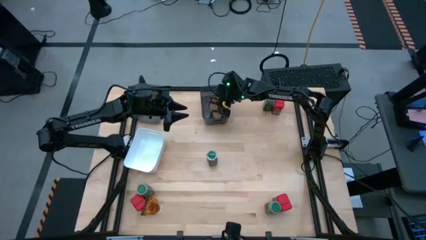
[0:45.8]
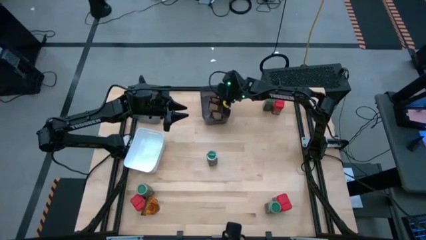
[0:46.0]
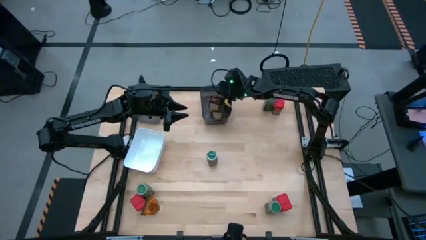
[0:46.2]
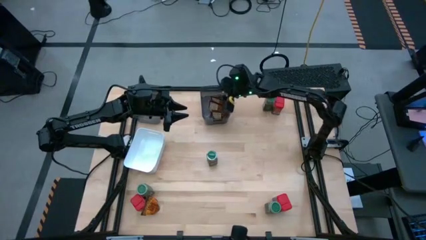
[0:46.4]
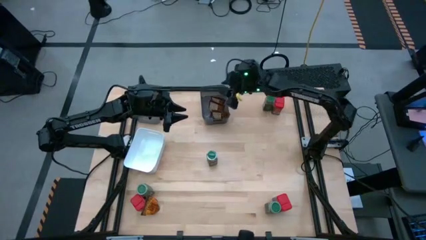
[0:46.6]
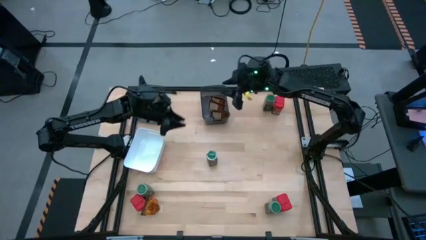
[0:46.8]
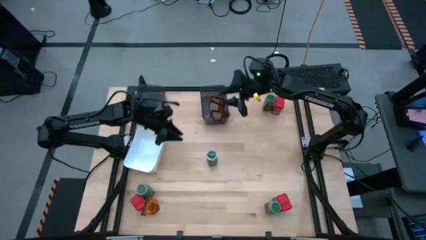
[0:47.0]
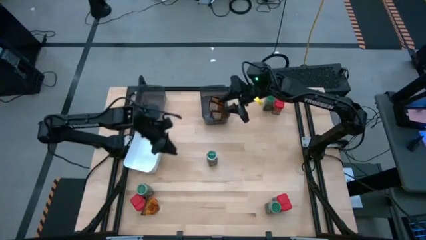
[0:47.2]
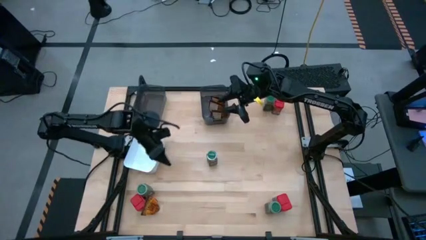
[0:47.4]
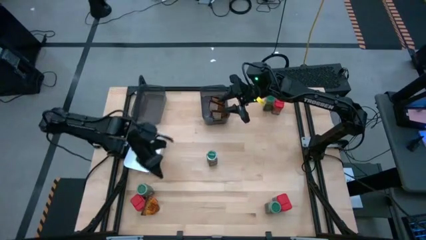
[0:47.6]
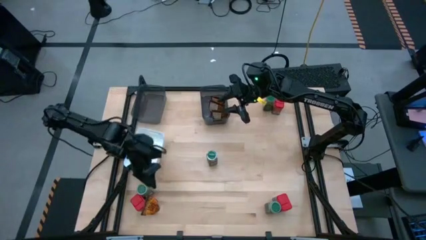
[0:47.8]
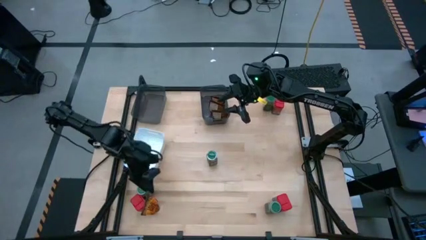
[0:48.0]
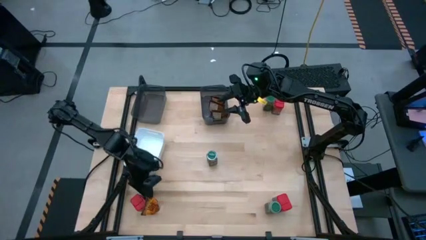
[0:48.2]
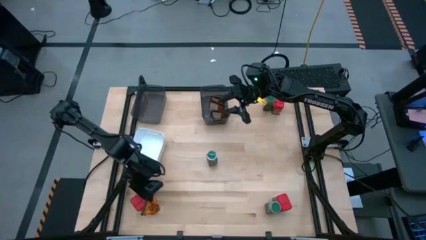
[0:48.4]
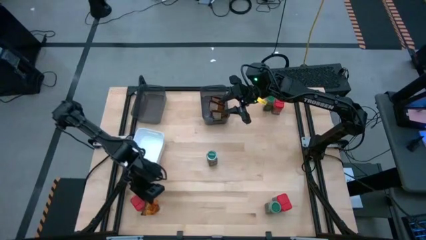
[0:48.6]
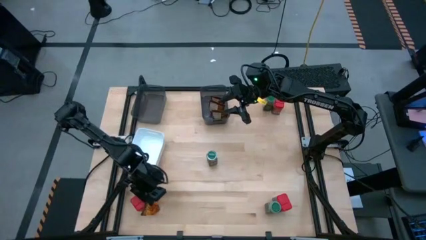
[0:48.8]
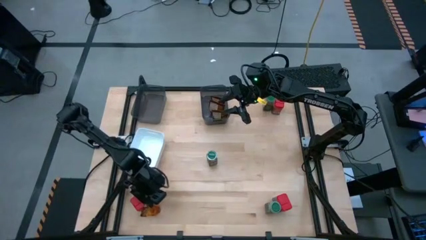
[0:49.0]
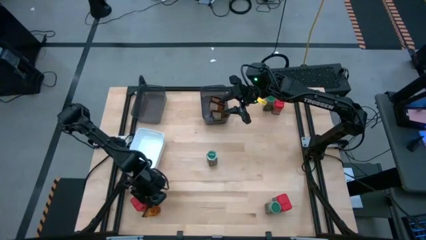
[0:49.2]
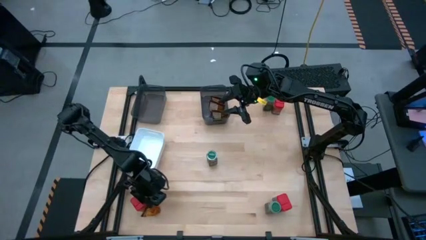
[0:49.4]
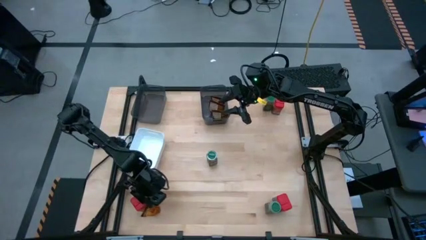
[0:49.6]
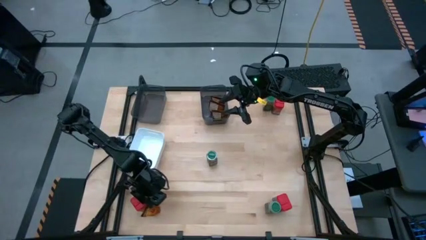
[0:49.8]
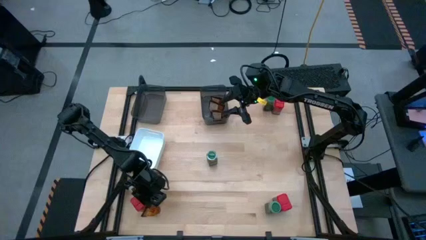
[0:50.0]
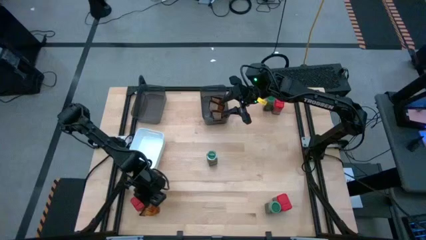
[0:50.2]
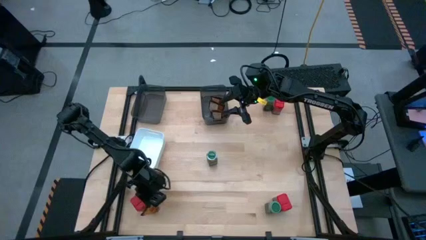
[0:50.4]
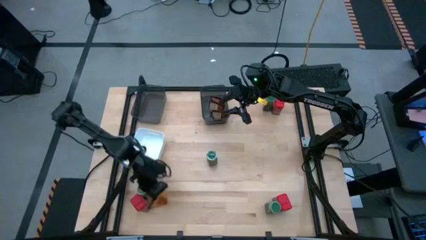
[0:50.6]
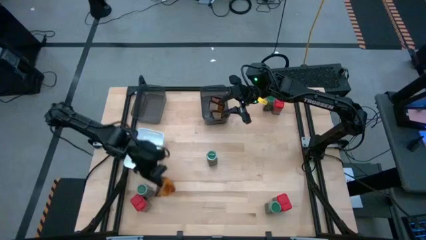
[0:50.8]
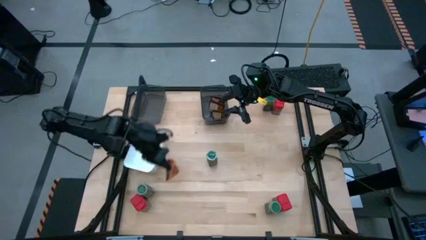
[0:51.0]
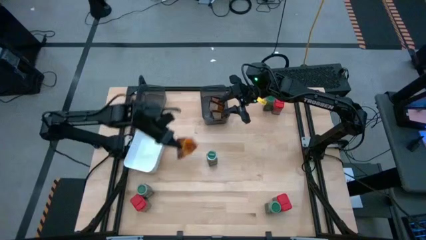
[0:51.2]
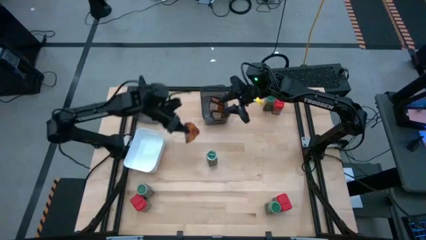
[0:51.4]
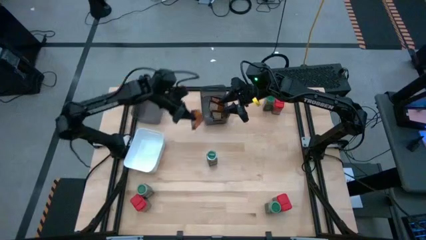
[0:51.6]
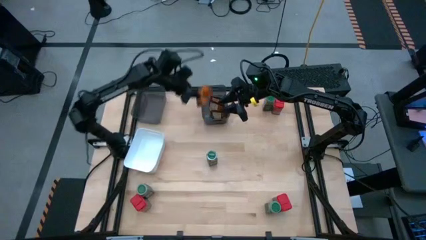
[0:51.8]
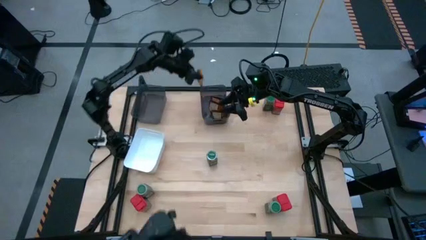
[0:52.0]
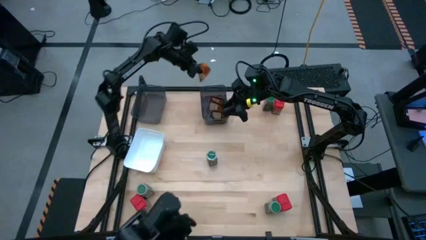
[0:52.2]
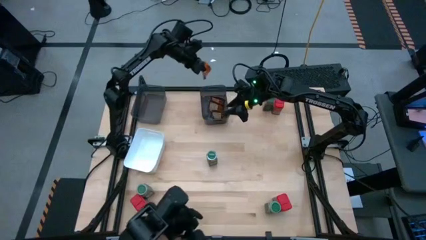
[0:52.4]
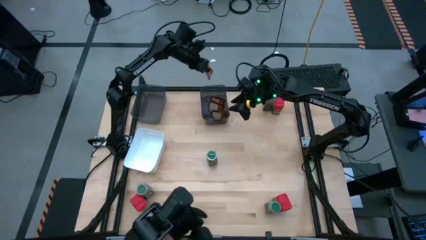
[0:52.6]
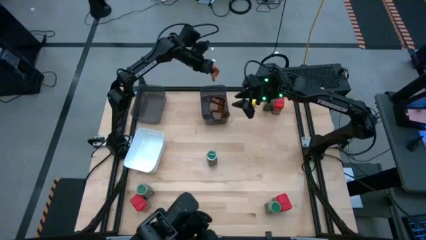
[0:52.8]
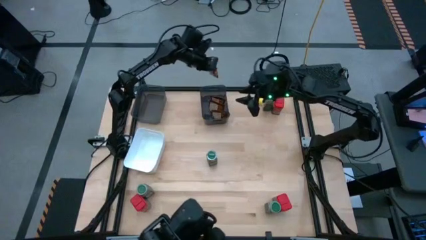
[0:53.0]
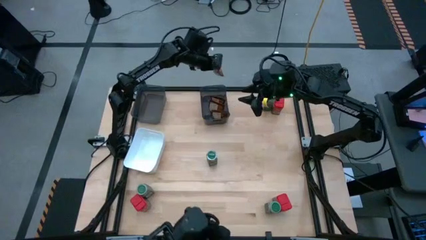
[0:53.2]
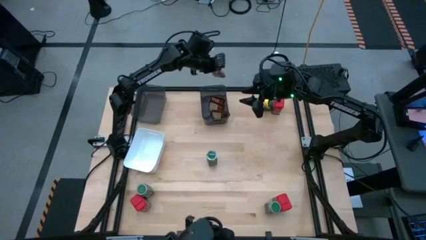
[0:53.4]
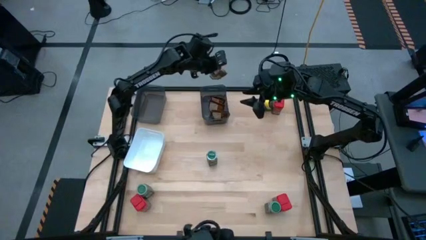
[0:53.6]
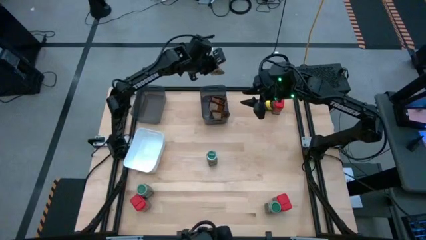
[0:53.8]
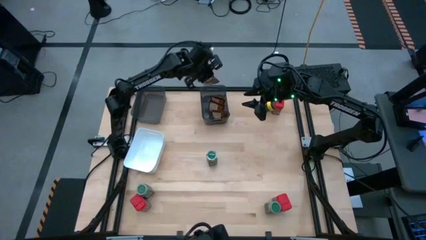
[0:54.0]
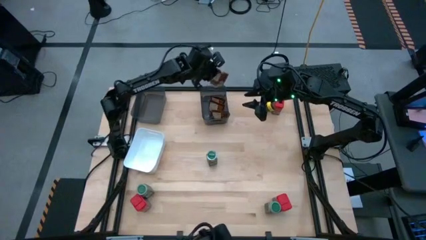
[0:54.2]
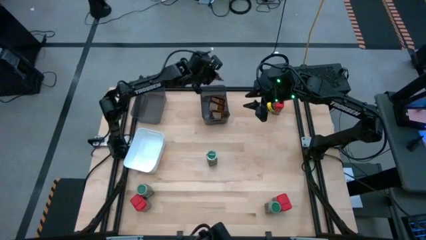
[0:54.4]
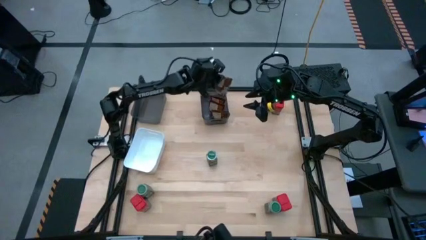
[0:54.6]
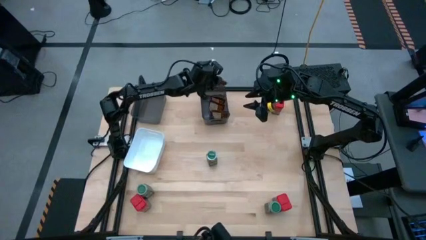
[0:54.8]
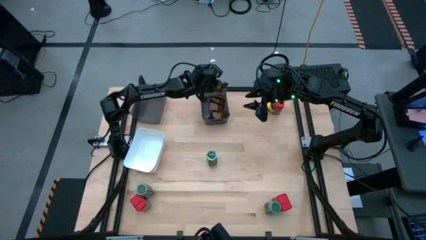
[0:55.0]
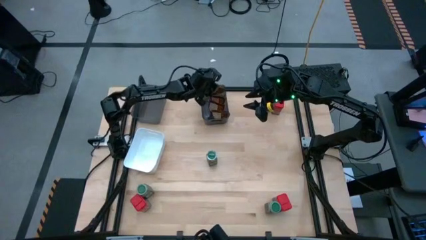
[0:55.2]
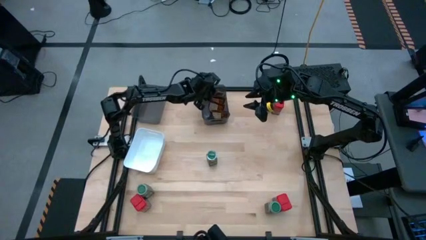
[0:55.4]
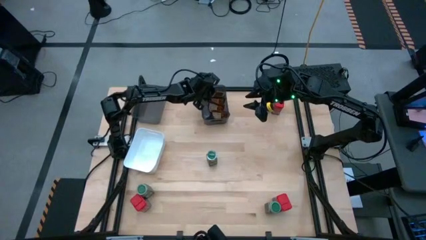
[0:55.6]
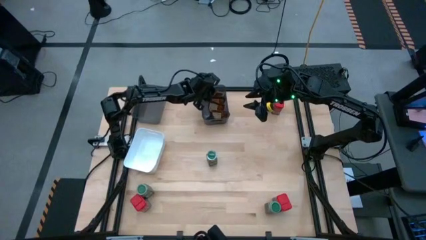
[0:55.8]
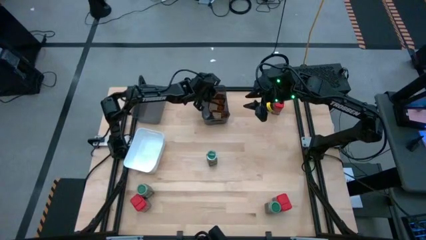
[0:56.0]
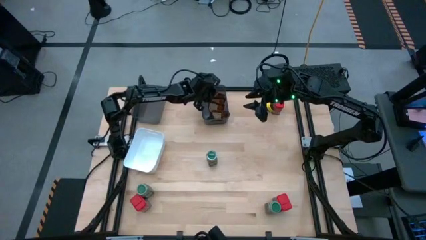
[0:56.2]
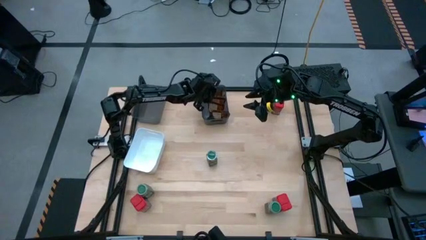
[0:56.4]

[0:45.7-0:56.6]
Task: Sort spices by type
Put the brown seasoning bag into the middle black bin

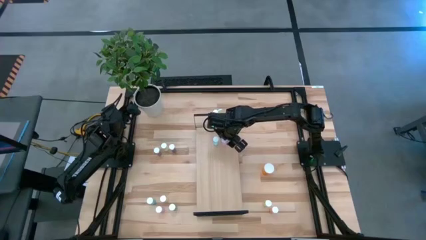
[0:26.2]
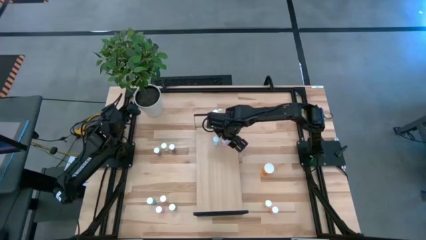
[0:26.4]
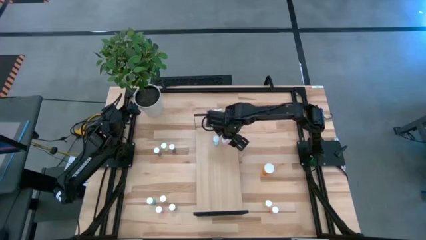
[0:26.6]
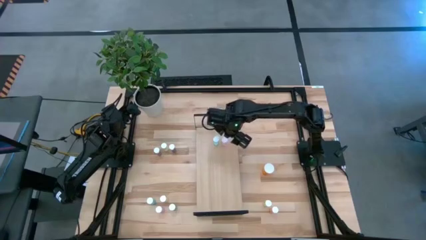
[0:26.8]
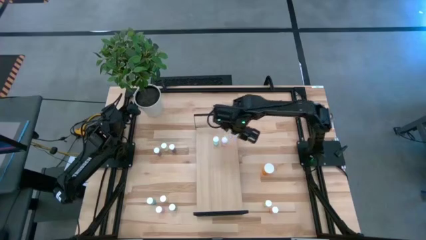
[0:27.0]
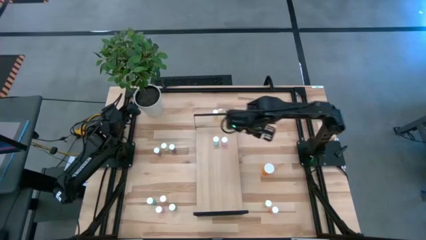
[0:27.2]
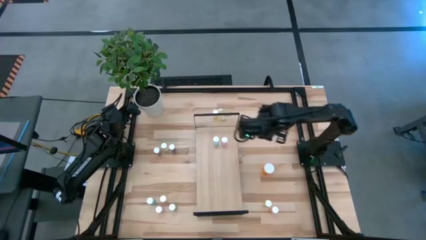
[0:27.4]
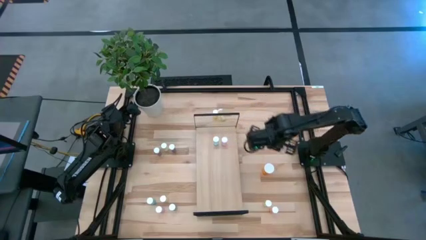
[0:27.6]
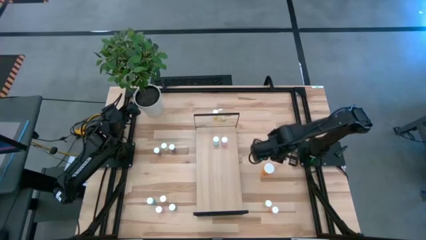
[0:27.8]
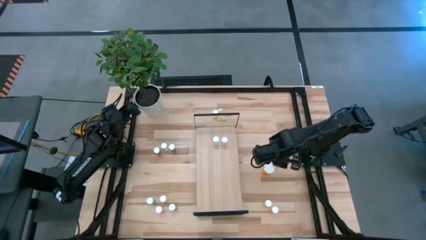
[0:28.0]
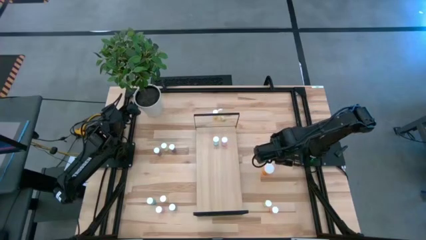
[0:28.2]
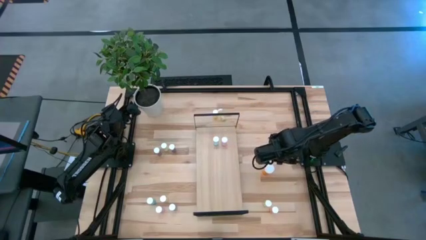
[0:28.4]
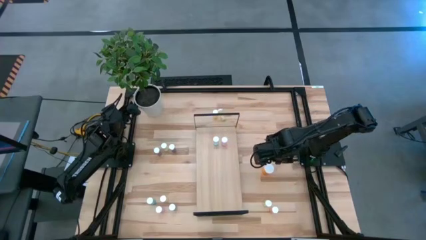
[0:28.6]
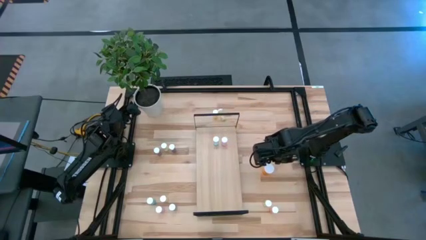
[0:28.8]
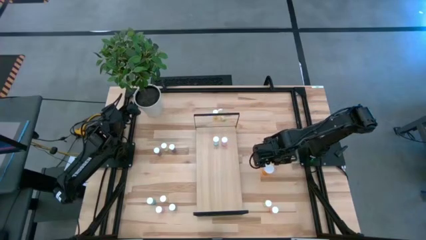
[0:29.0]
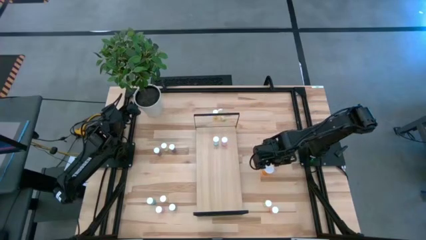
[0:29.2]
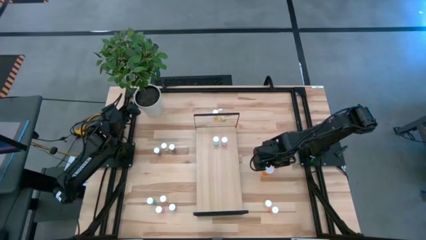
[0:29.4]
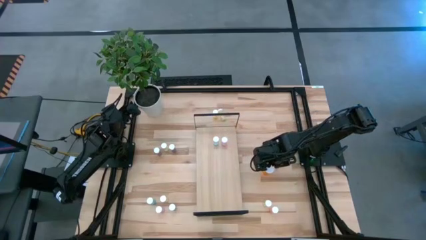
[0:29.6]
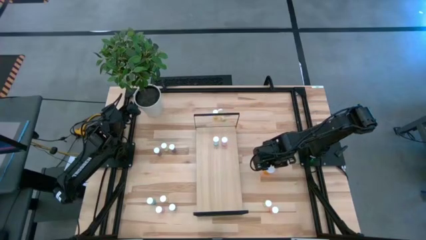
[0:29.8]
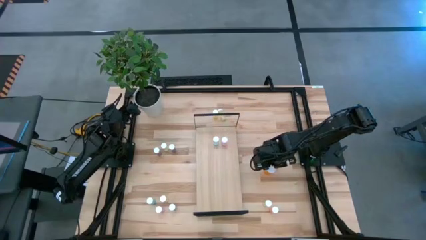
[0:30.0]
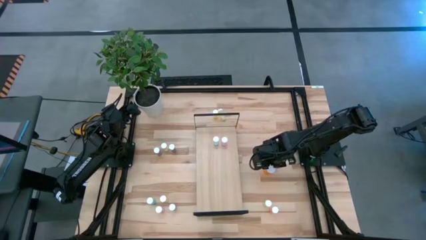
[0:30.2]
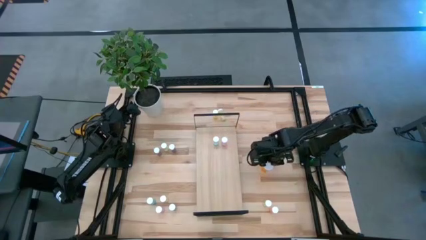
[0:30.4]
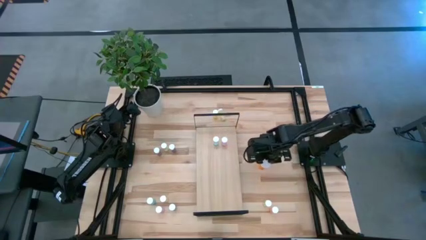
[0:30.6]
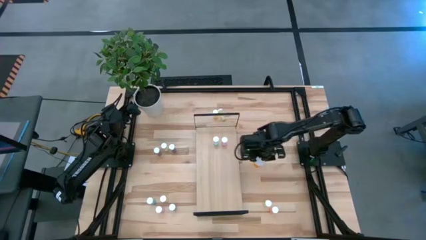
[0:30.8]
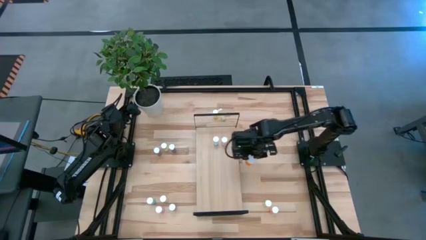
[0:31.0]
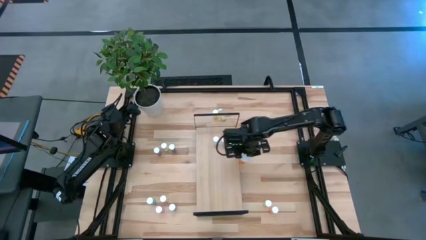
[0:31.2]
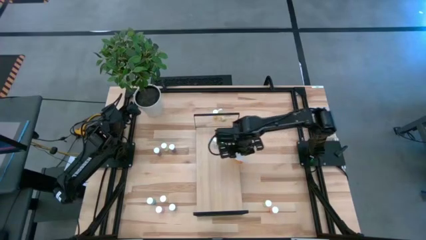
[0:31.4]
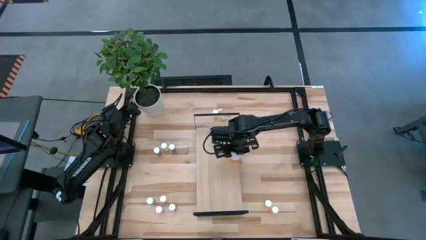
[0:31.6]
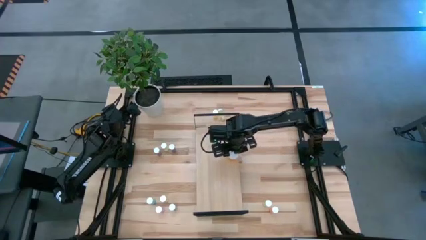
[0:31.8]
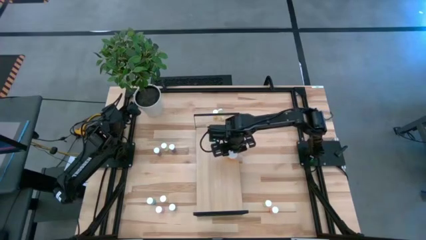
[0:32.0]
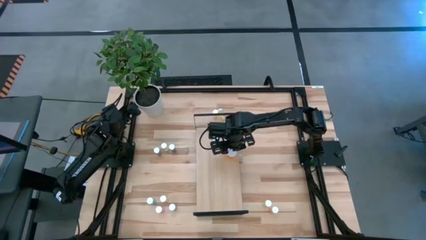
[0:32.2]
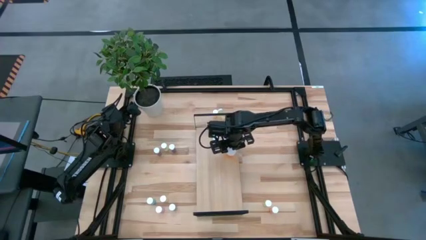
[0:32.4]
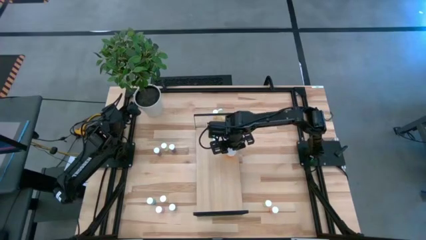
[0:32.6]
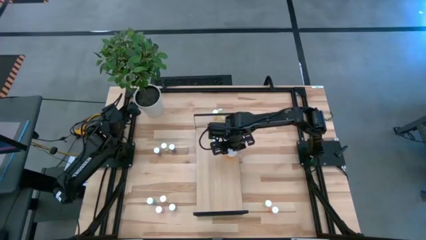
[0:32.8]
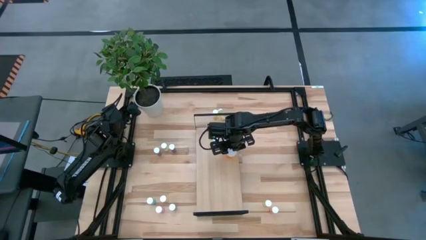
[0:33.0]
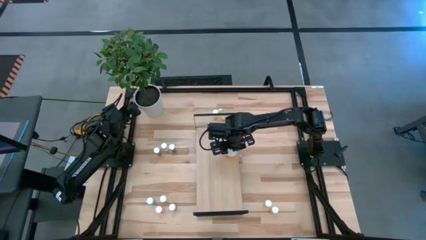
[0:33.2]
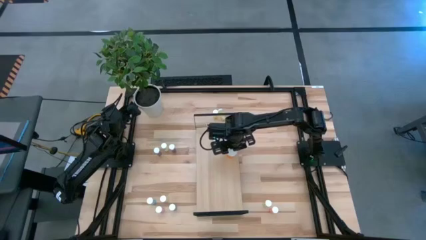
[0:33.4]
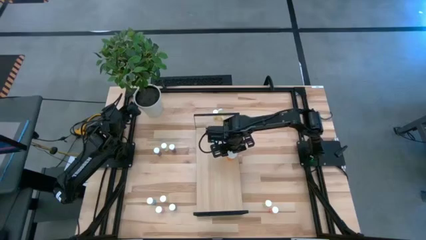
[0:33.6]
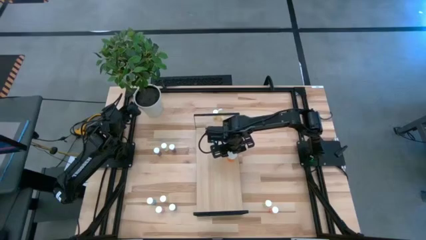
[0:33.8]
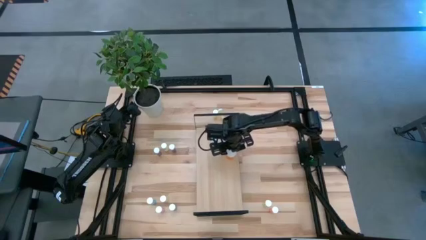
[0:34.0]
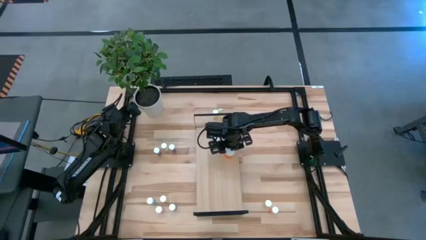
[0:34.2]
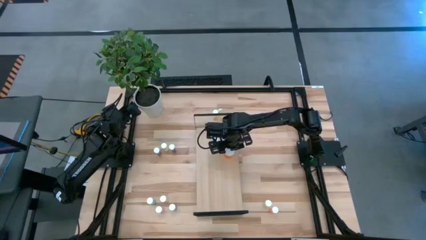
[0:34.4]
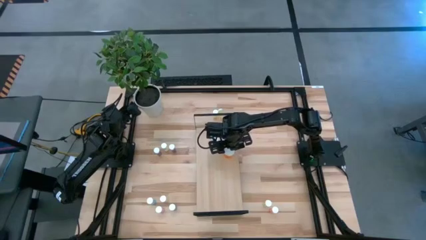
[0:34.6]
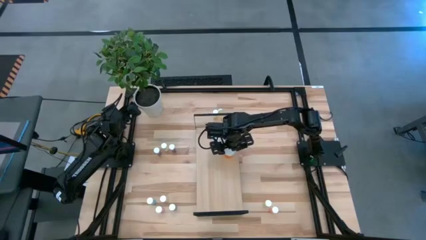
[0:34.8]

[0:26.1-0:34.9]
Task: Pick and place medicine bottles onto shelf by color
Put the orange pill bottle on the shelf
